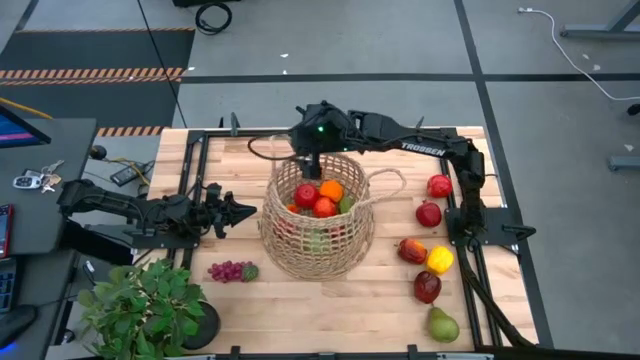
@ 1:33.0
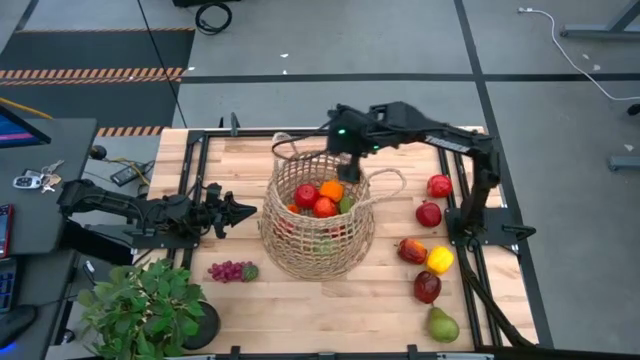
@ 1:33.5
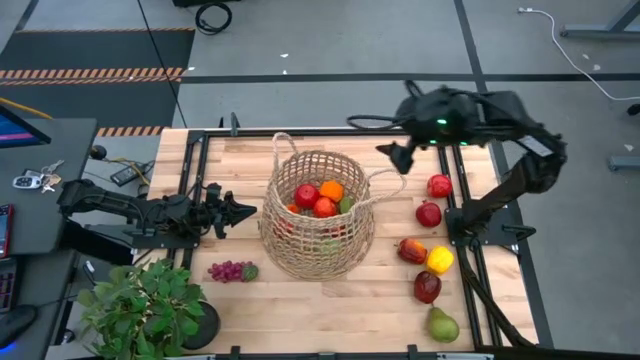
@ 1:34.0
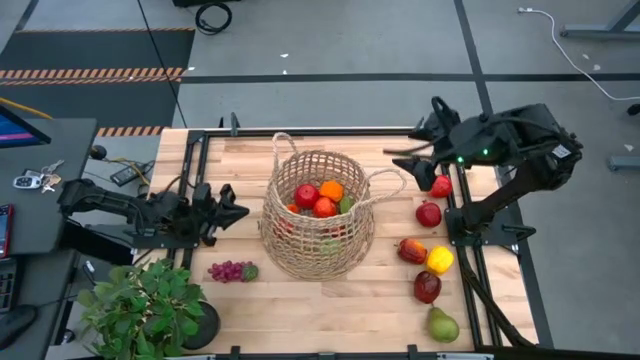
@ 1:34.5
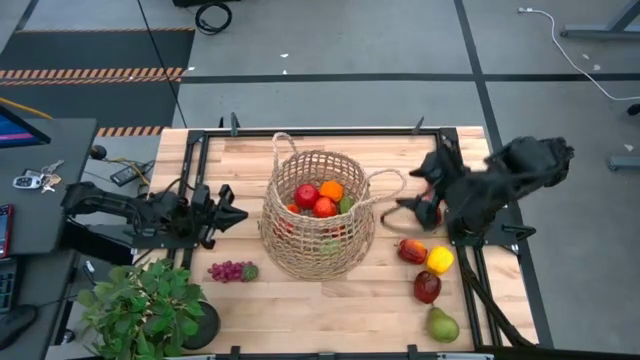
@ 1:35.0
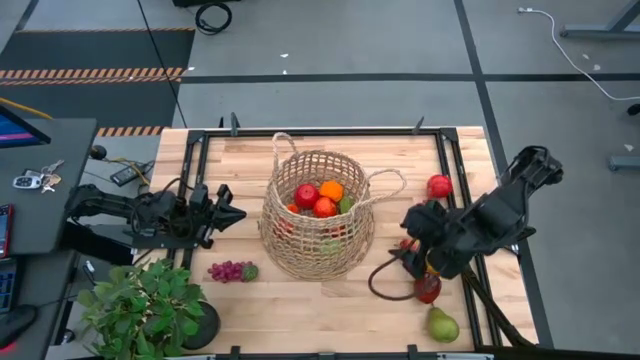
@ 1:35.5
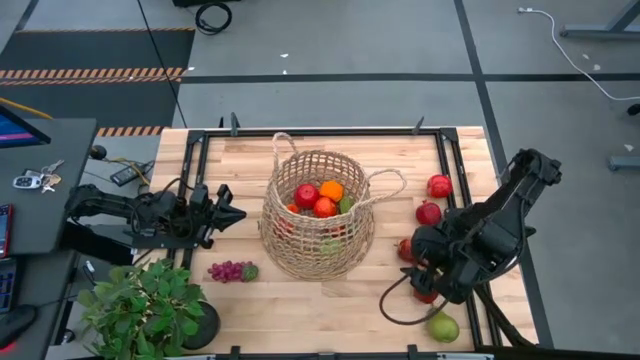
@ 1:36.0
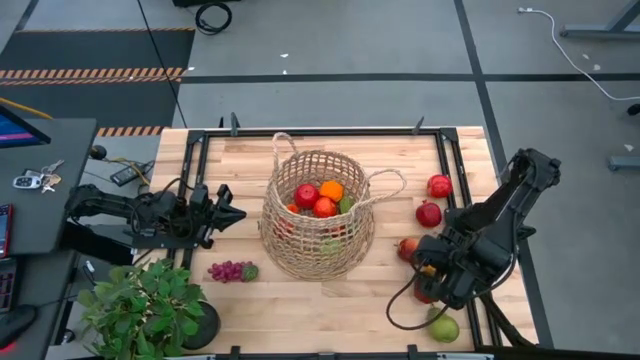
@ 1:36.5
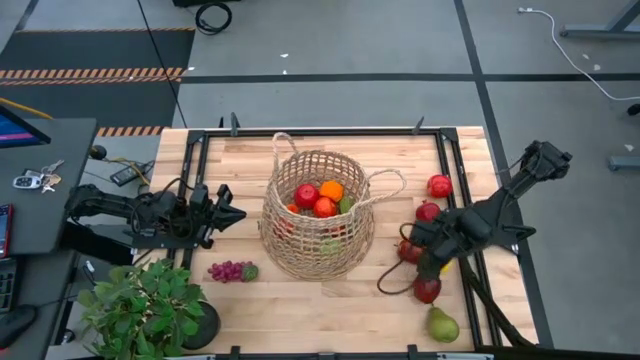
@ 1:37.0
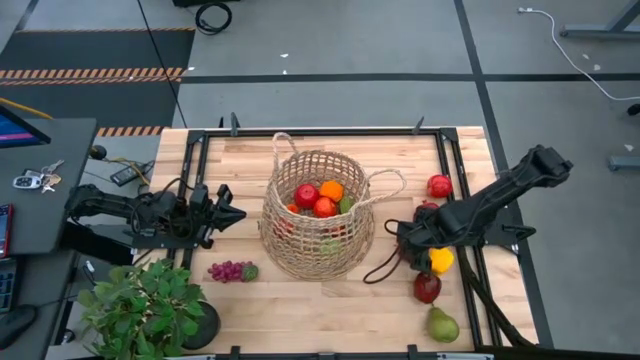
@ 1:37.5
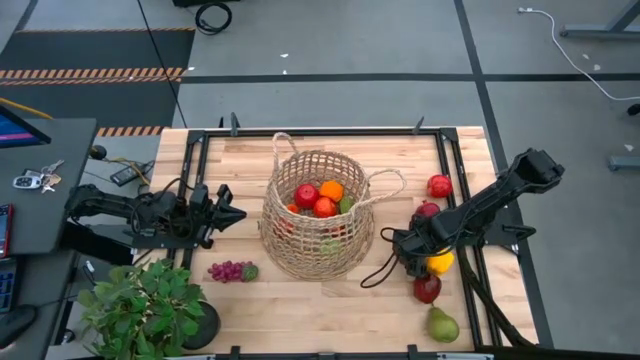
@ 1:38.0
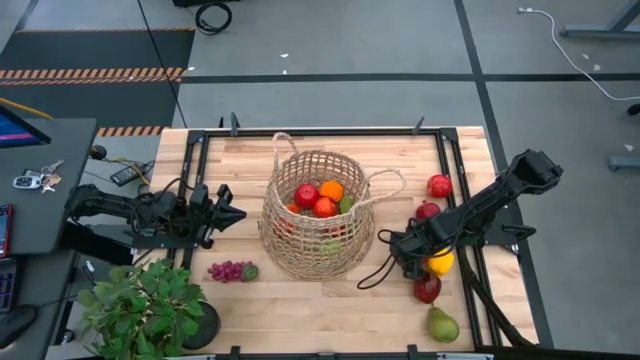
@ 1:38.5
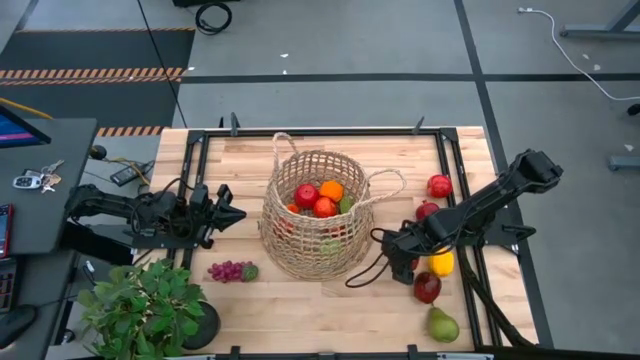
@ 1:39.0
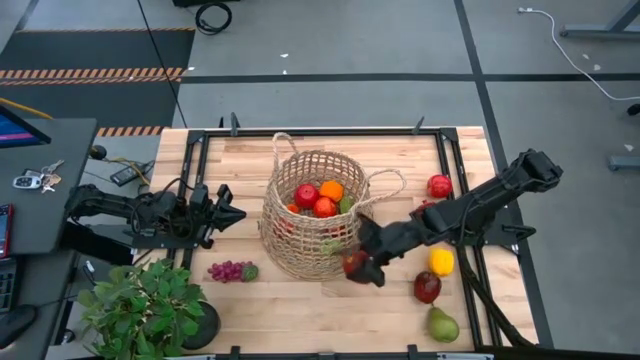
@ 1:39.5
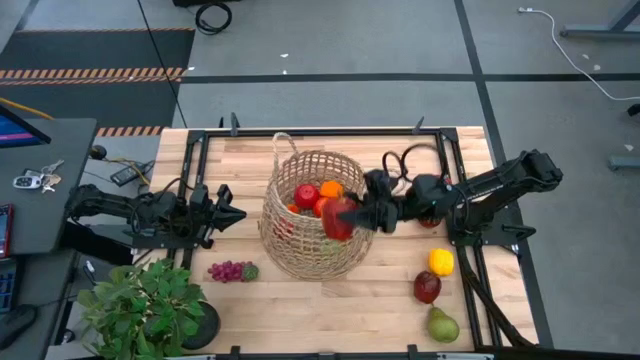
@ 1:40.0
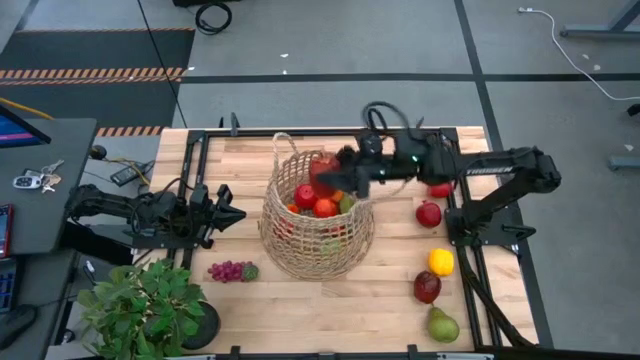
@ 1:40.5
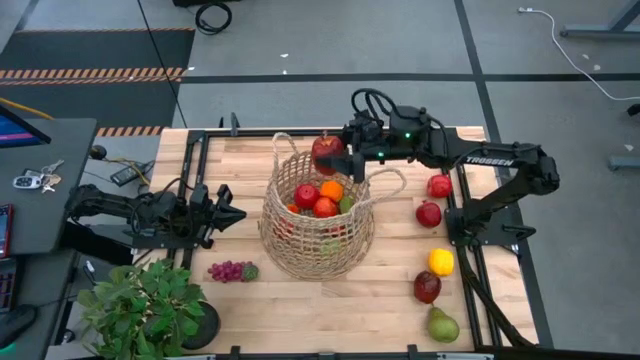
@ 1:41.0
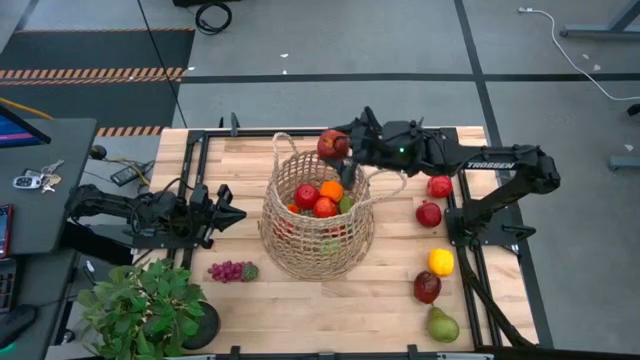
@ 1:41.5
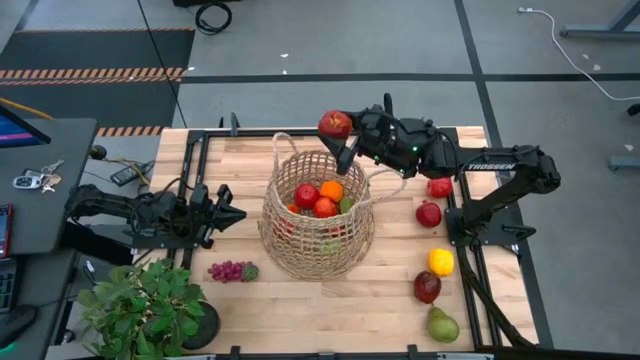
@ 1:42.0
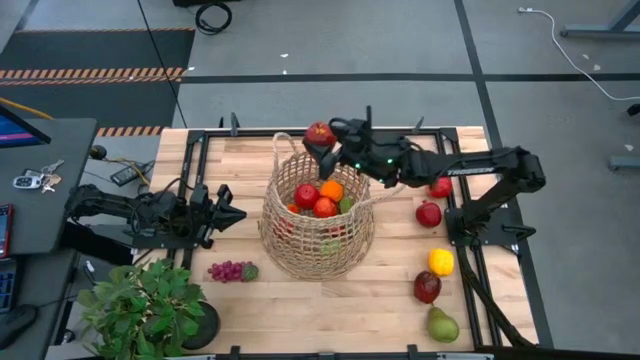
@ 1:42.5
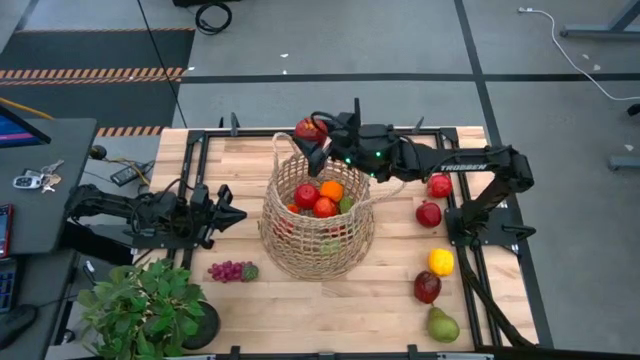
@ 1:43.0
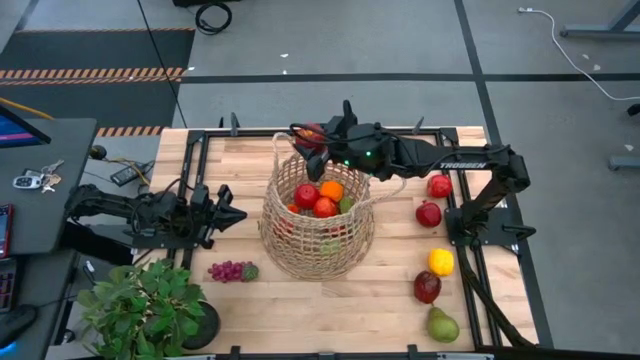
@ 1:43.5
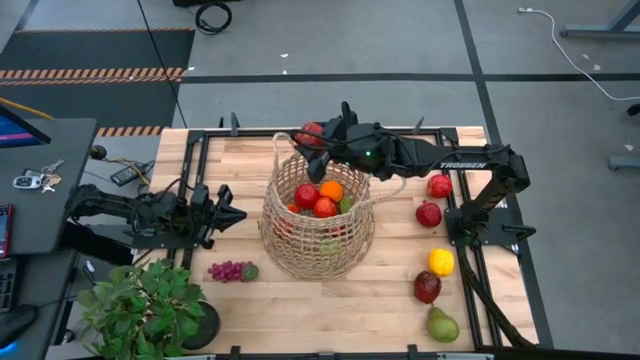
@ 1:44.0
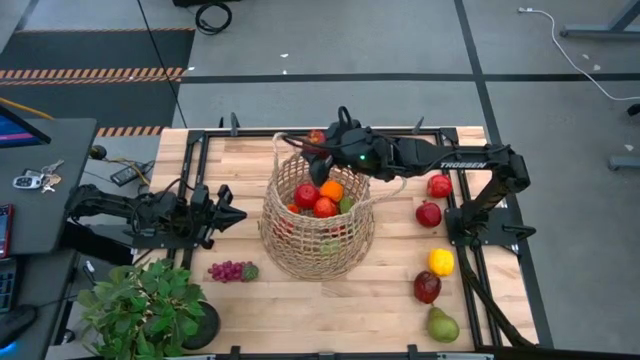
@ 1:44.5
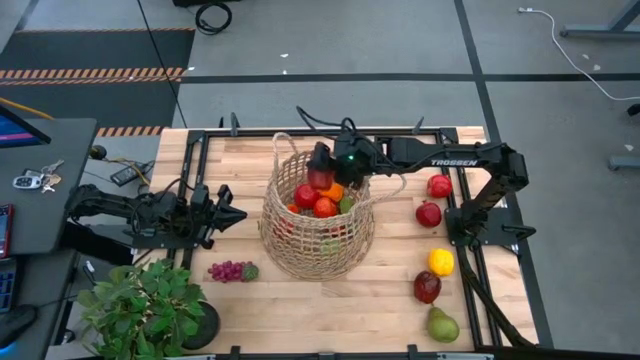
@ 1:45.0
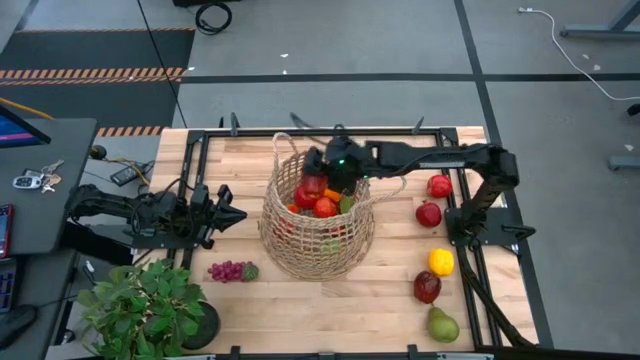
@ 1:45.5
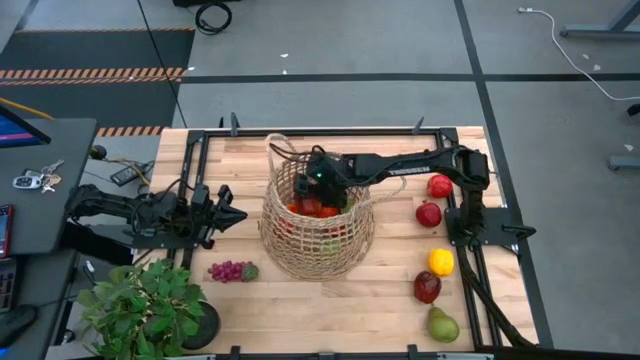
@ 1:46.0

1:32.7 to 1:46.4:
Task: Build produce basket
Put the red apple into the brown basket

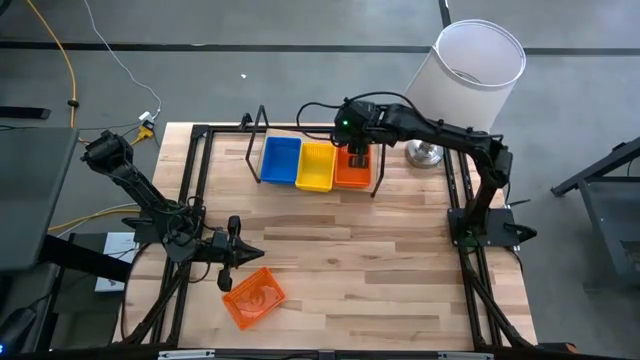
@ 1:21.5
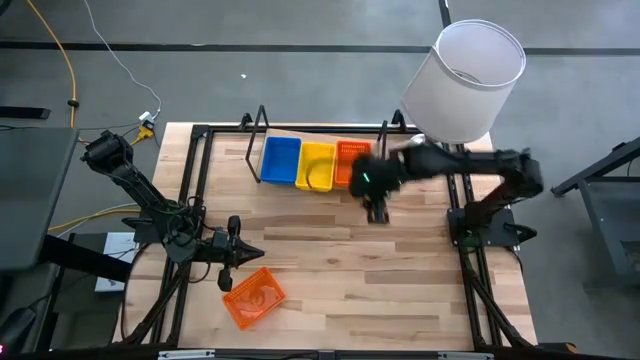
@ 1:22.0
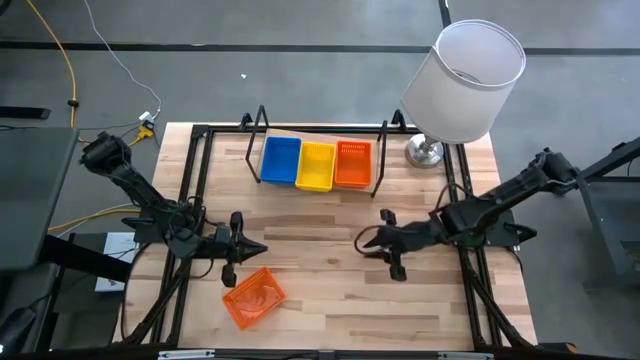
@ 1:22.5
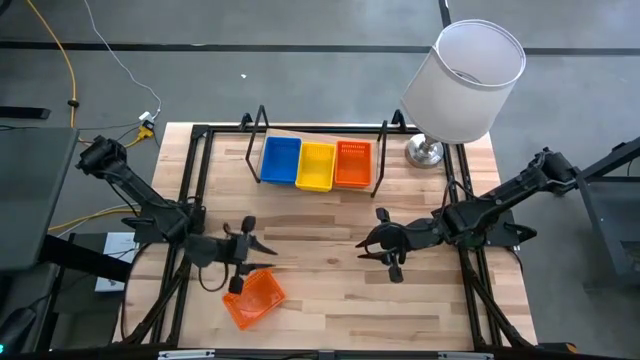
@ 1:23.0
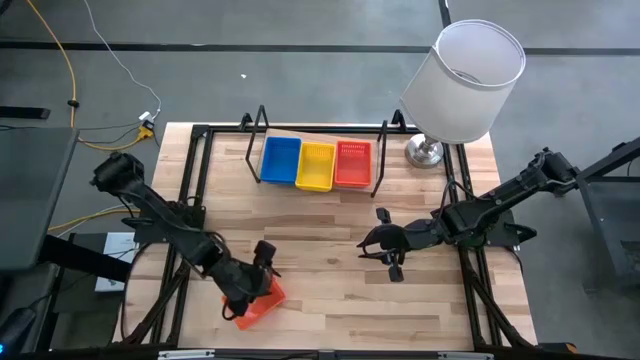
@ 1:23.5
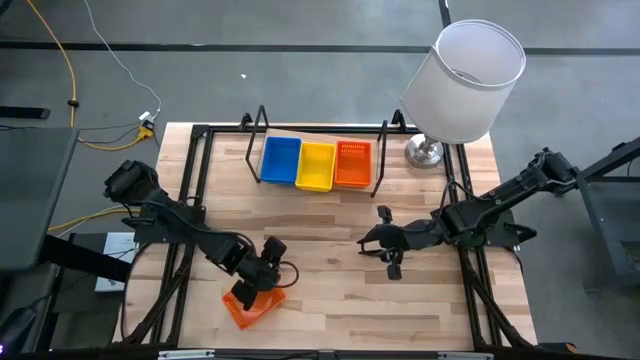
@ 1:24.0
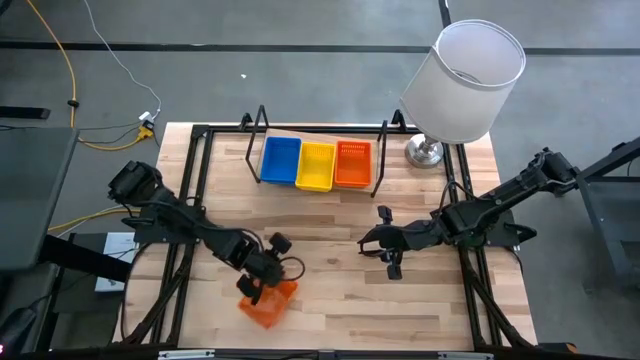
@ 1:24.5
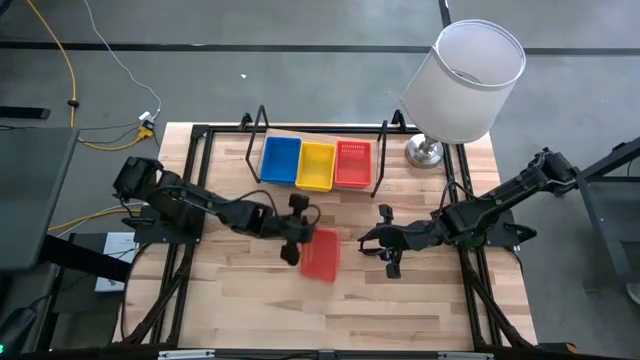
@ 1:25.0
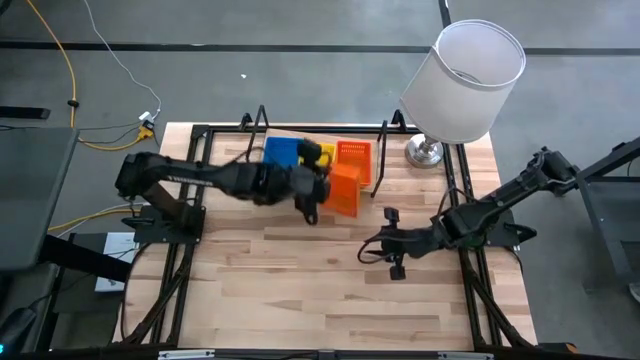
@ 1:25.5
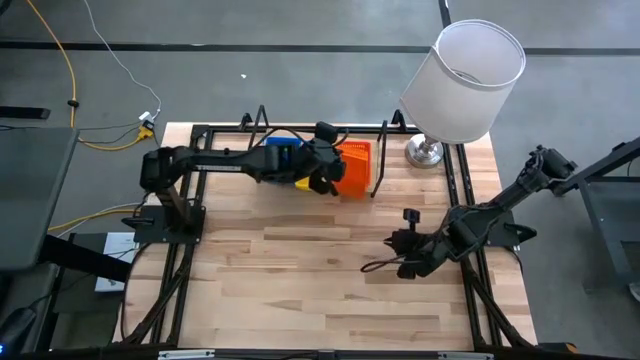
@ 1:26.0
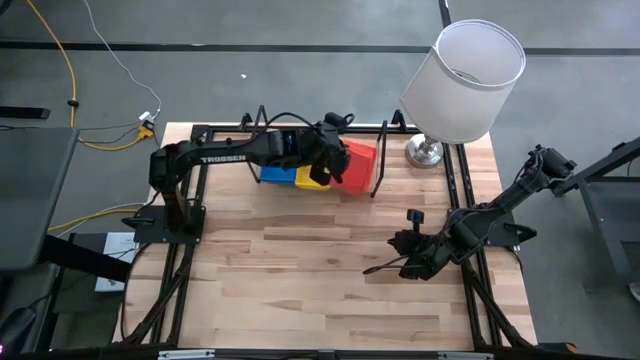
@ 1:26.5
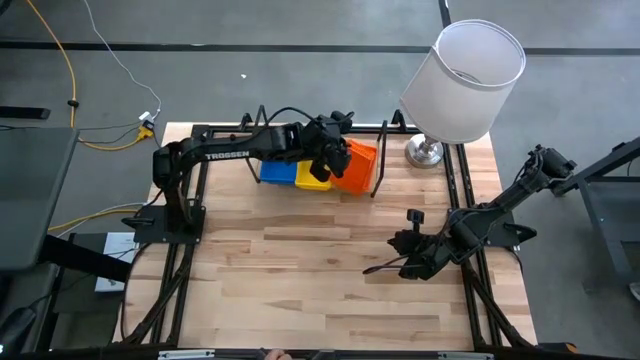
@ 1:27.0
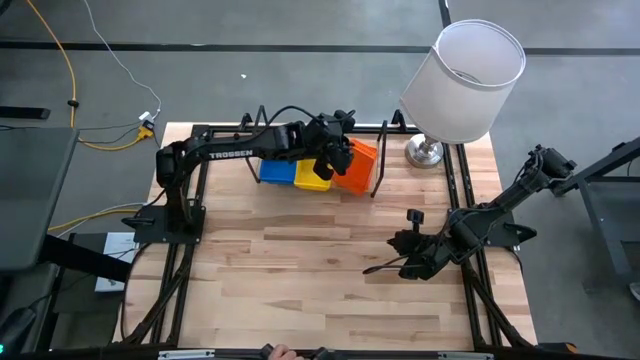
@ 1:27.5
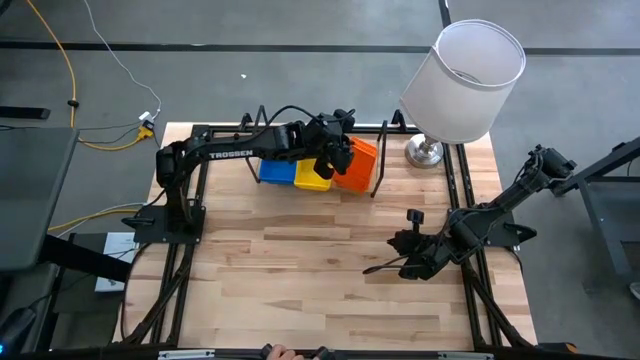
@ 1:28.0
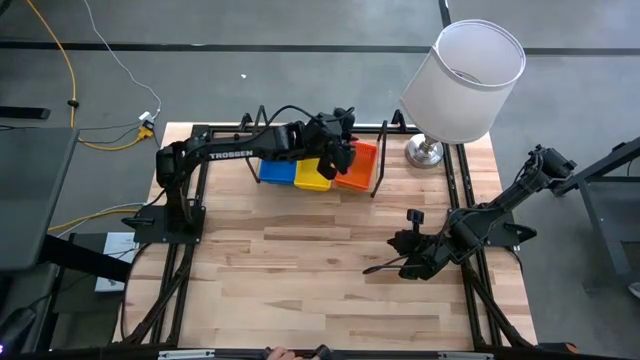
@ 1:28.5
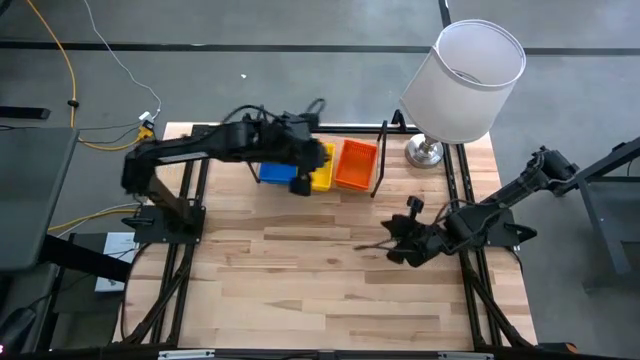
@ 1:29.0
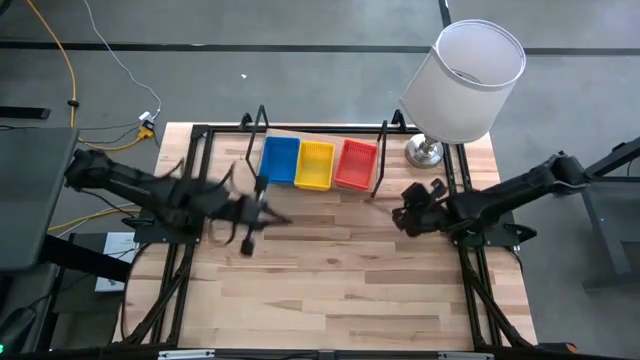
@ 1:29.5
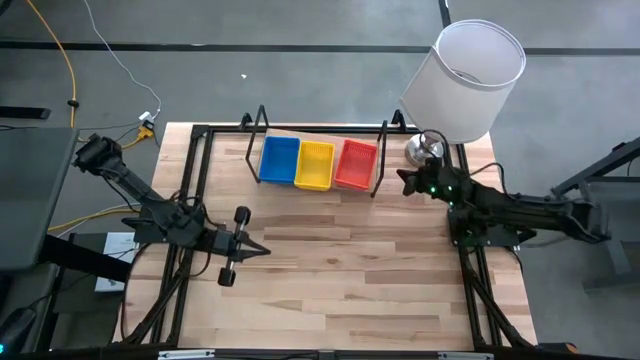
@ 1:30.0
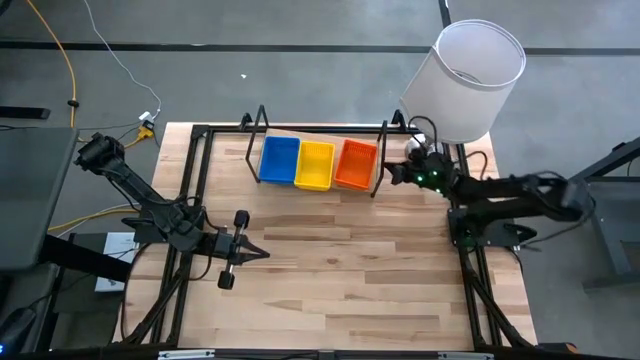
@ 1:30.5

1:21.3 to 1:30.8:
Task: Stack baskets on shelf by color
Stack the orange bin on the orange bin on the shelf
